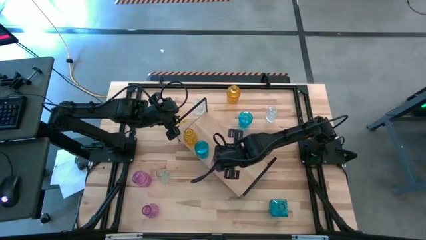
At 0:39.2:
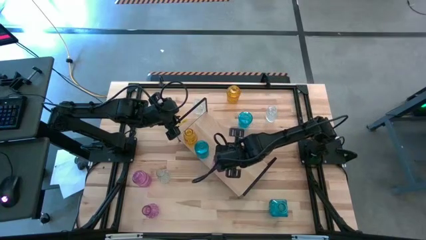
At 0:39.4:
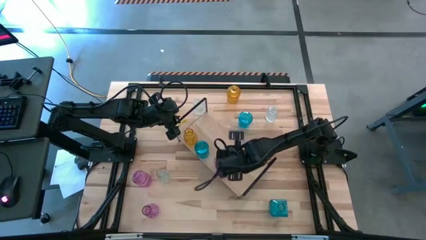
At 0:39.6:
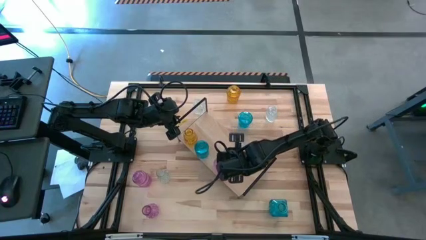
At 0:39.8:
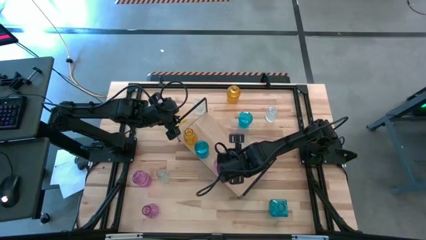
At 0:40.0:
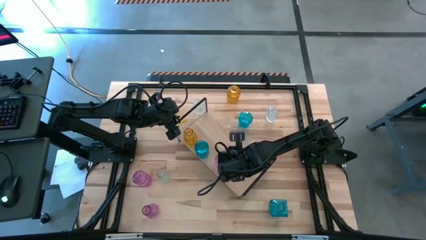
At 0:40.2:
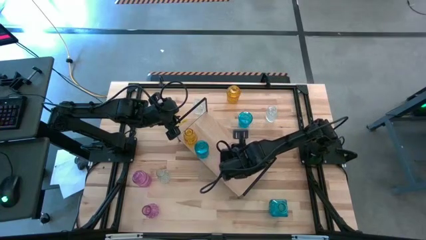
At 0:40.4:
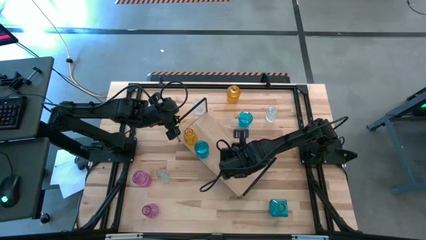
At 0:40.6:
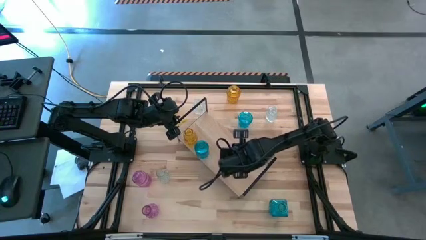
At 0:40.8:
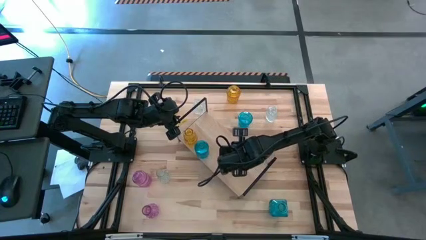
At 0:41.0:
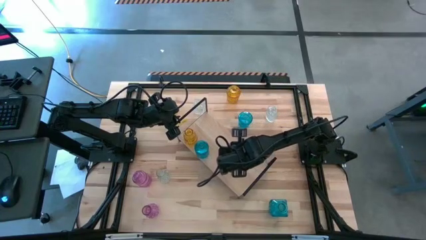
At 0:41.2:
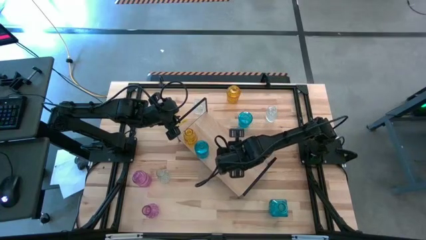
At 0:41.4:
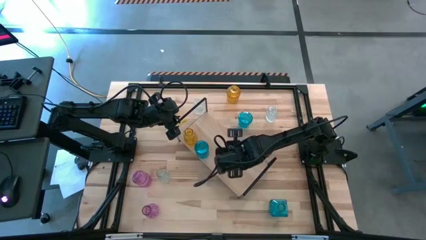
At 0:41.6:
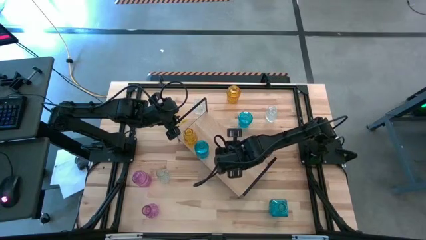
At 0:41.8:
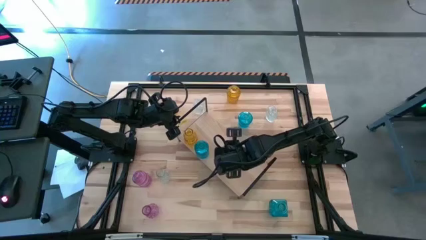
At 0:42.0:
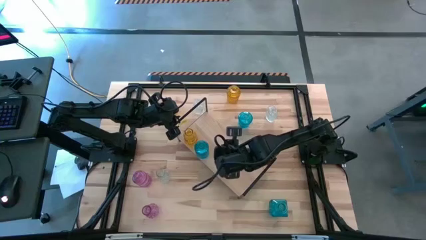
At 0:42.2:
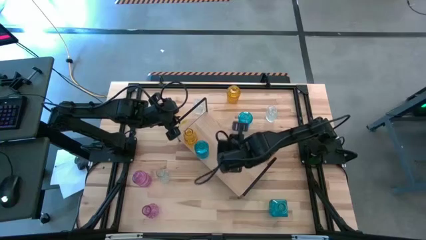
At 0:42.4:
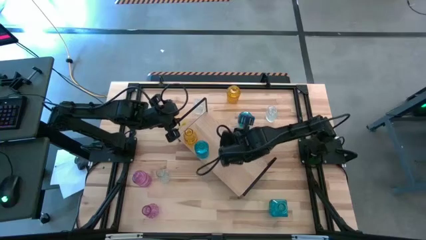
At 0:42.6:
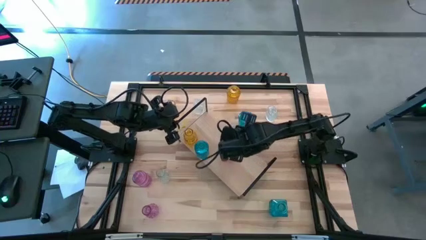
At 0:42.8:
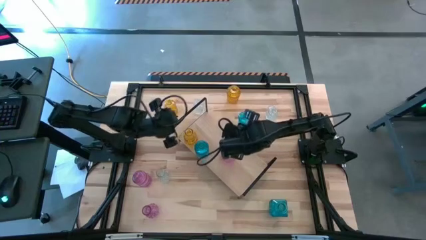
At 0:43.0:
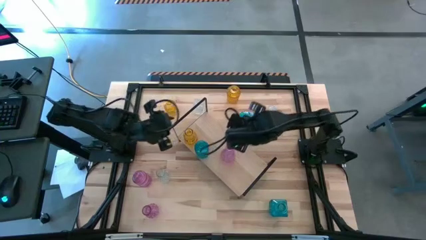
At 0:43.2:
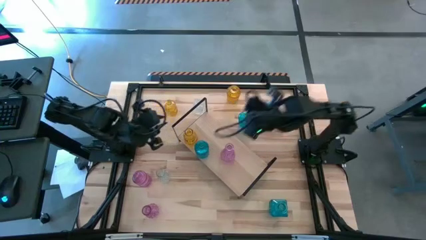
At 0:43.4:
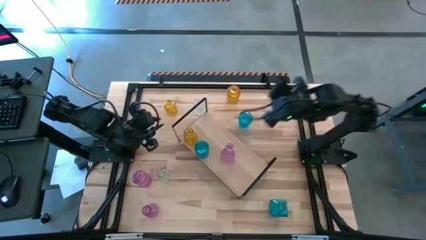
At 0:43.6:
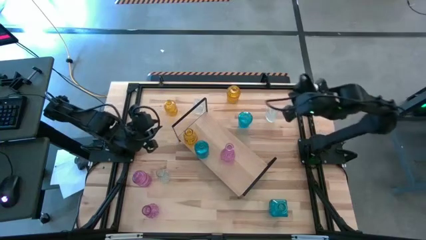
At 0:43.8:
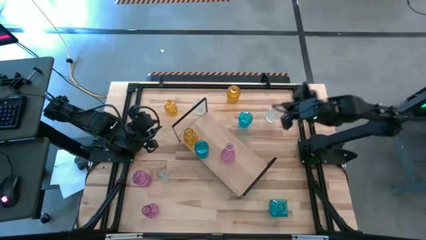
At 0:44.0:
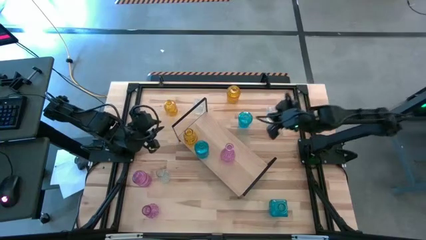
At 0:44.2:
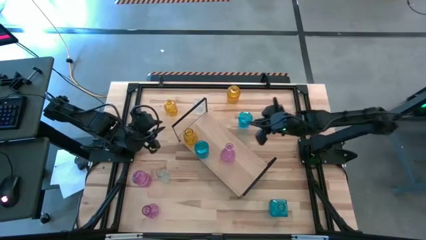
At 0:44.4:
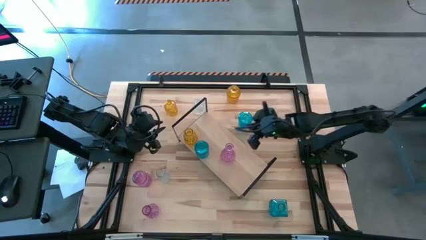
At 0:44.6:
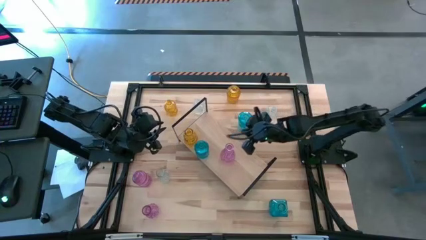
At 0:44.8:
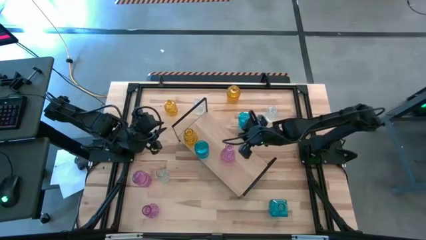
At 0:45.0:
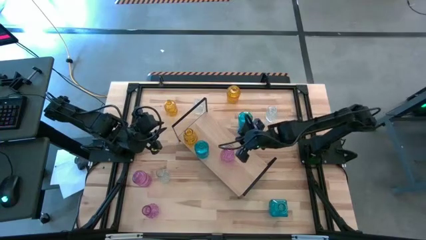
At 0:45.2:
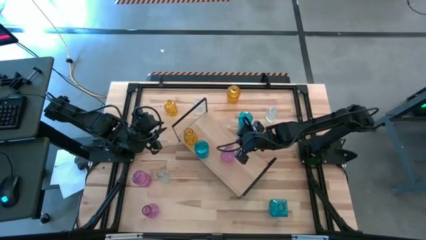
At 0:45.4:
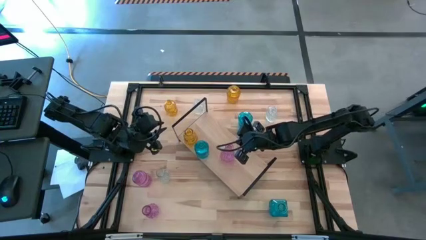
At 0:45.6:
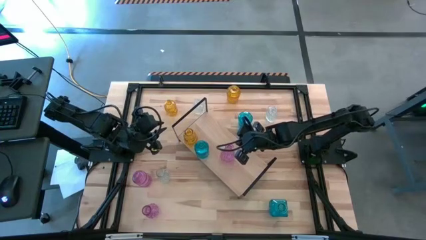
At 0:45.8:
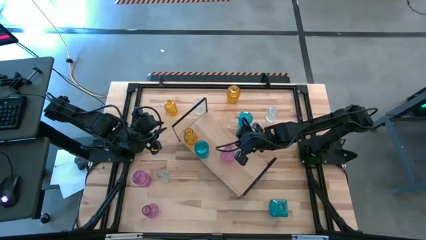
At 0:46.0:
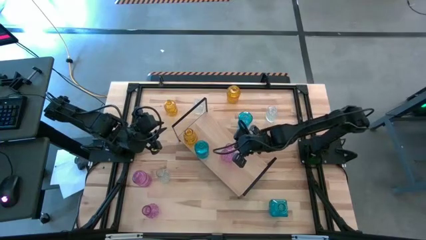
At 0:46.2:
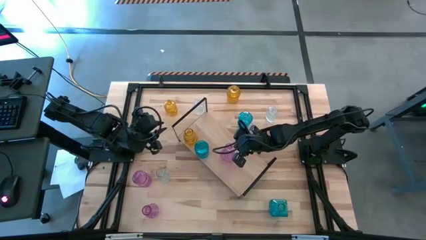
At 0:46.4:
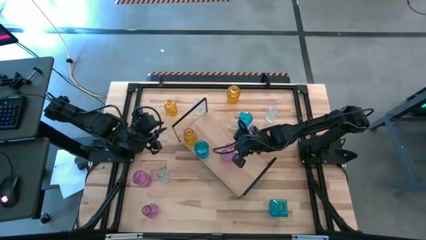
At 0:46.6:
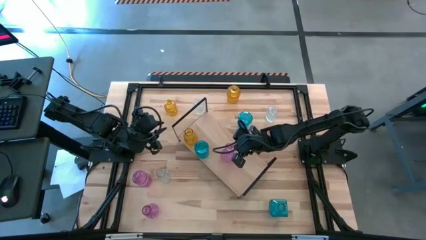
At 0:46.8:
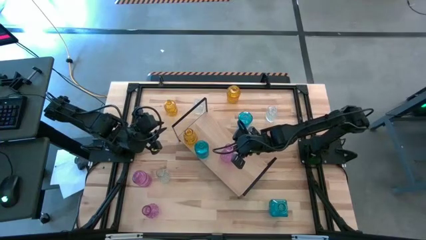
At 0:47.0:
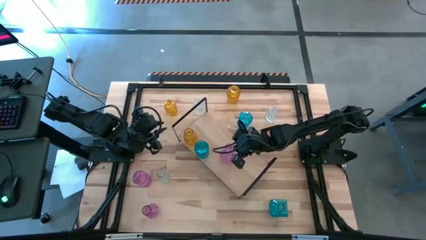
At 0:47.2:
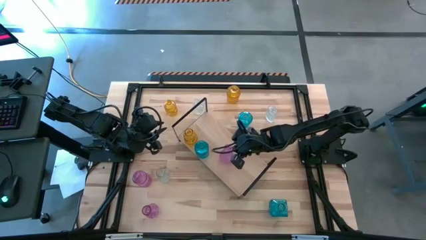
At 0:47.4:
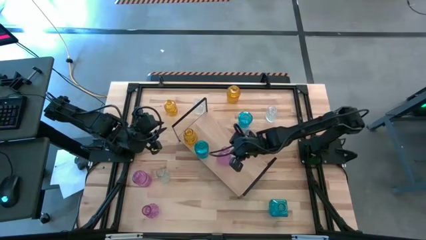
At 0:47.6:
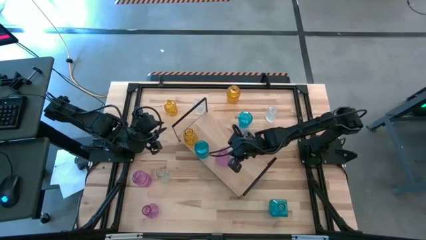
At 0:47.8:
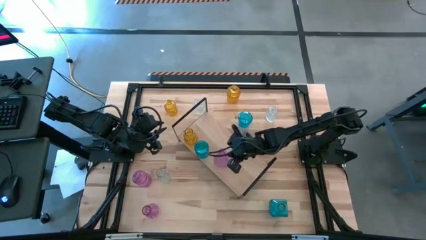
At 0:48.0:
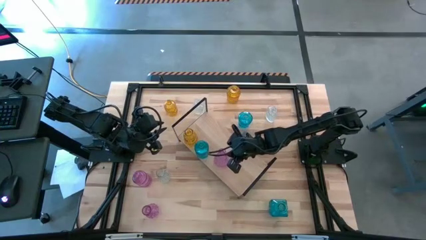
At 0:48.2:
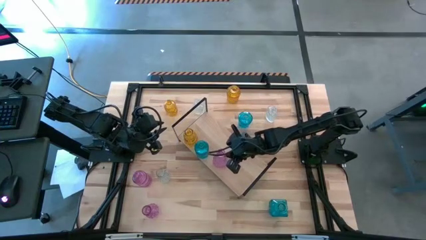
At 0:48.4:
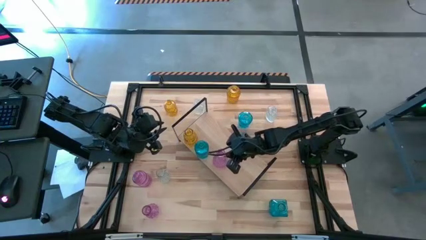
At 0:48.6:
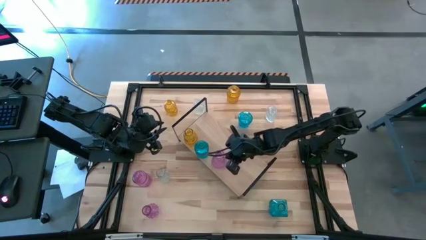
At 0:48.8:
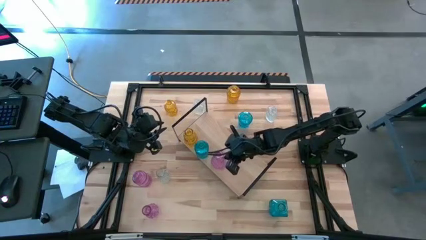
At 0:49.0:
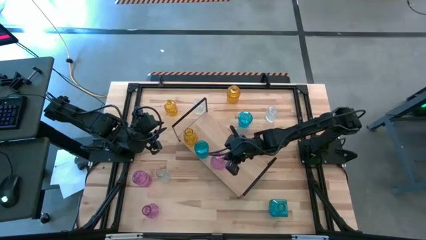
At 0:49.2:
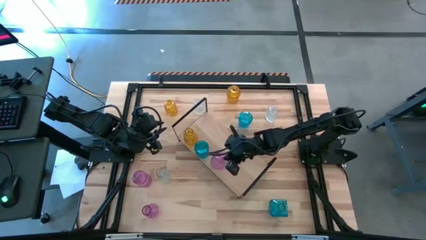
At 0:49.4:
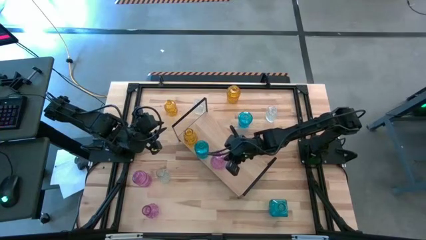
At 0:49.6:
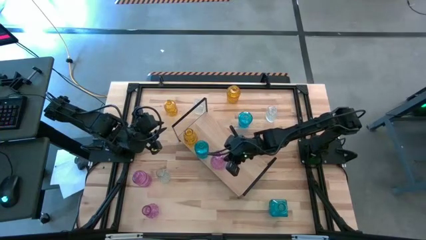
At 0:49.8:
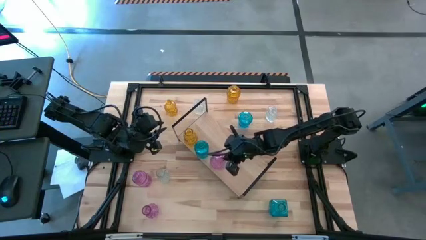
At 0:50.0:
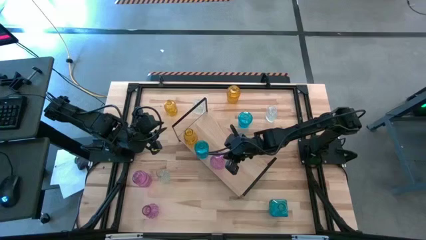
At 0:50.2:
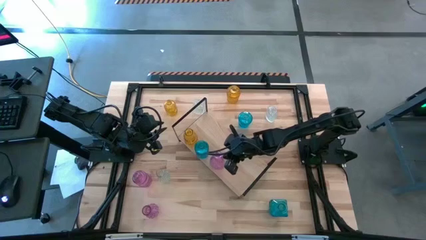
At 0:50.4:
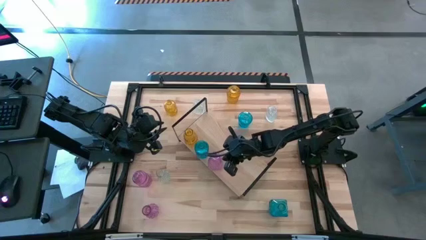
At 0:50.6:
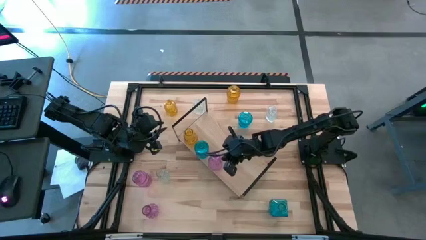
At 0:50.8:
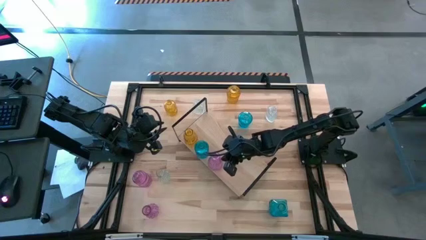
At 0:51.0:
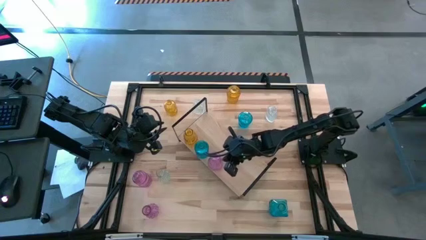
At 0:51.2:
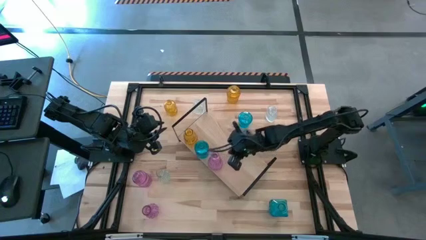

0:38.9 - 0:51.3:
Task: sort vases onto shelf
Put the top right pink crystal vase on the shelf
